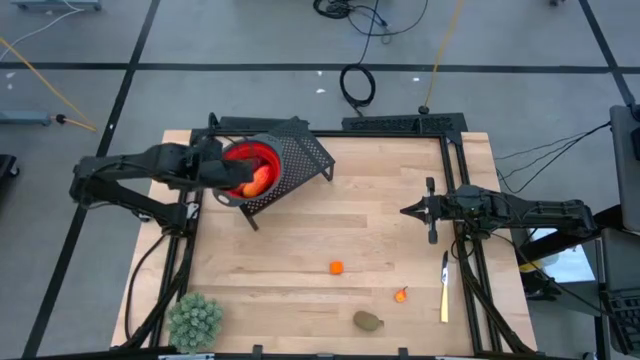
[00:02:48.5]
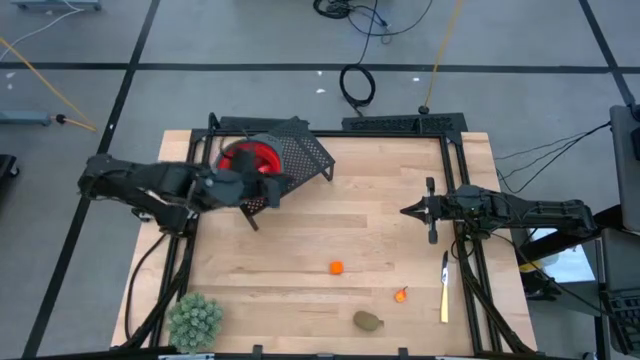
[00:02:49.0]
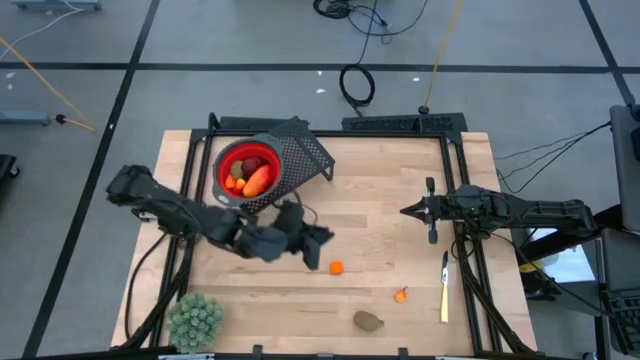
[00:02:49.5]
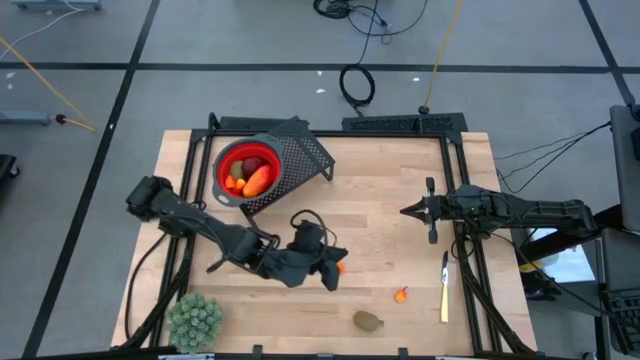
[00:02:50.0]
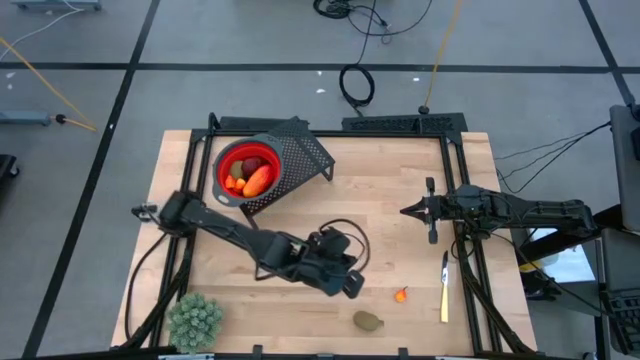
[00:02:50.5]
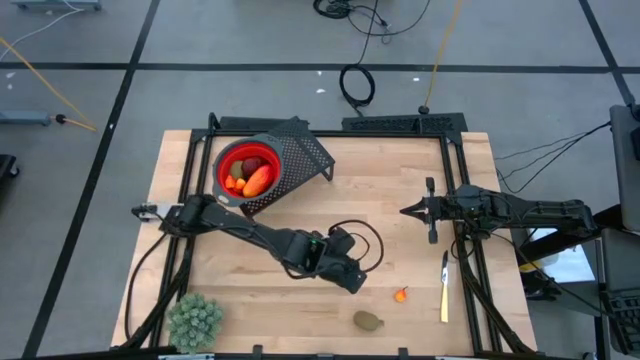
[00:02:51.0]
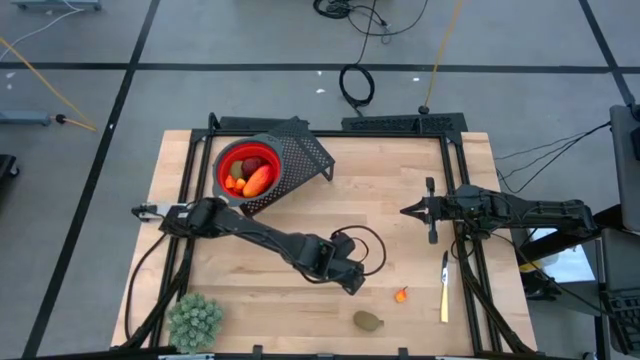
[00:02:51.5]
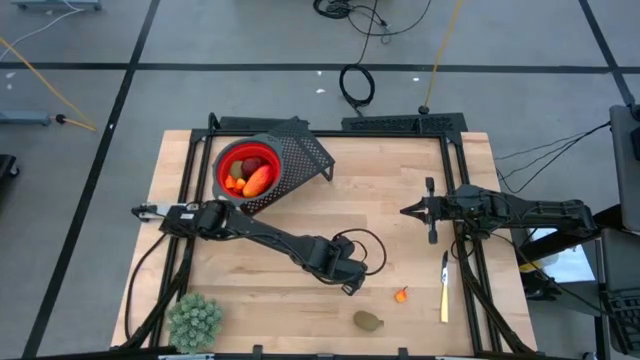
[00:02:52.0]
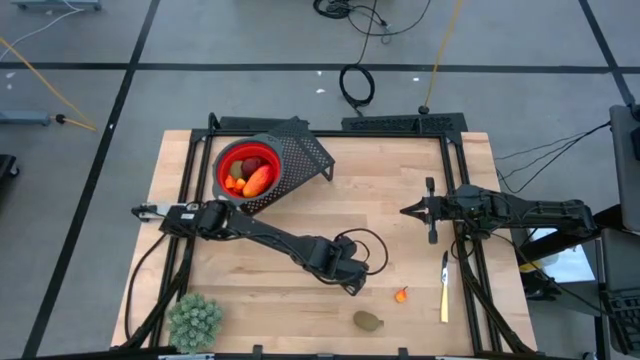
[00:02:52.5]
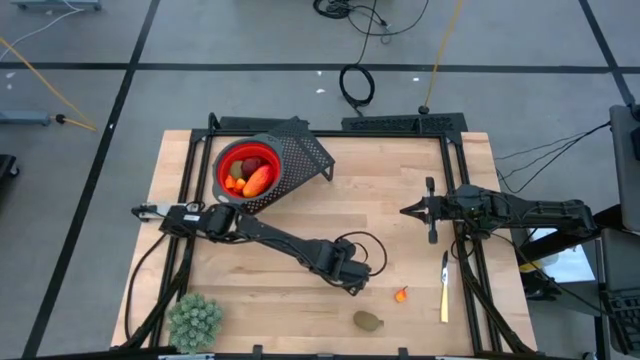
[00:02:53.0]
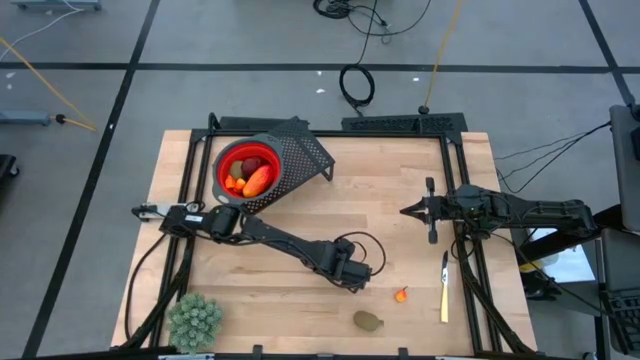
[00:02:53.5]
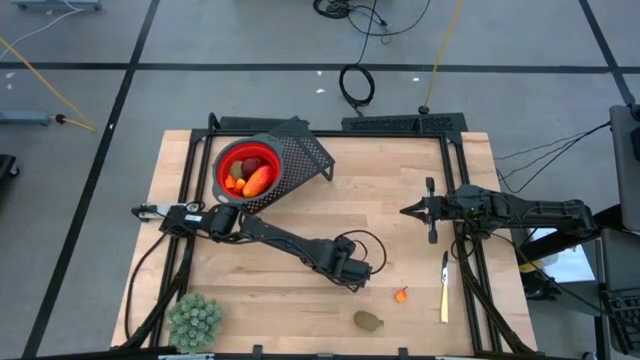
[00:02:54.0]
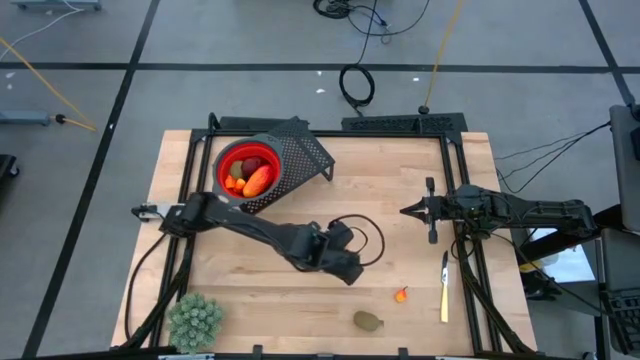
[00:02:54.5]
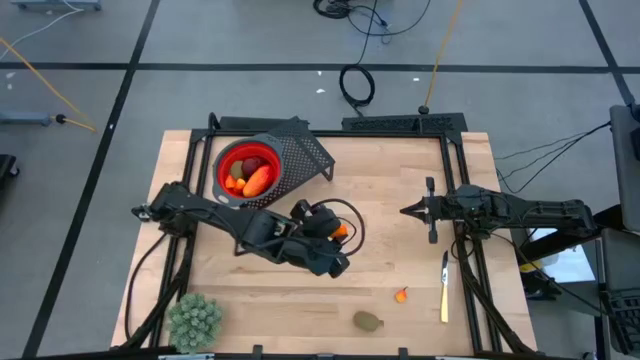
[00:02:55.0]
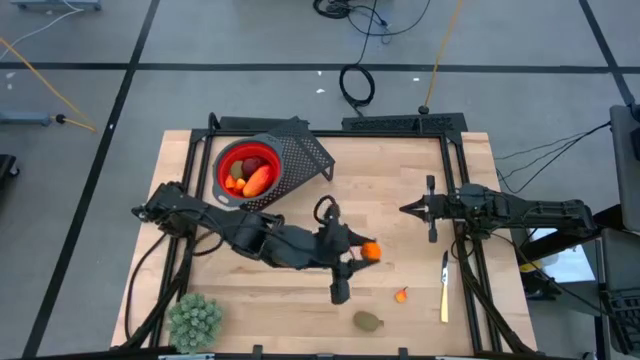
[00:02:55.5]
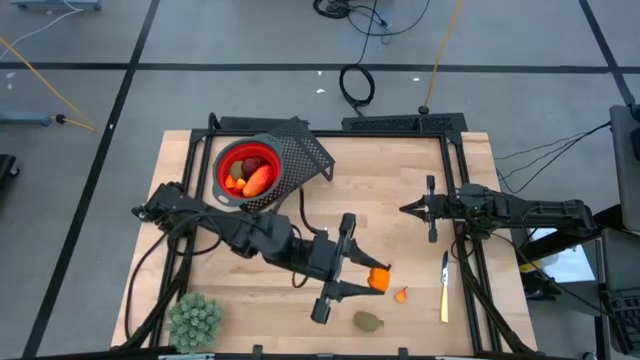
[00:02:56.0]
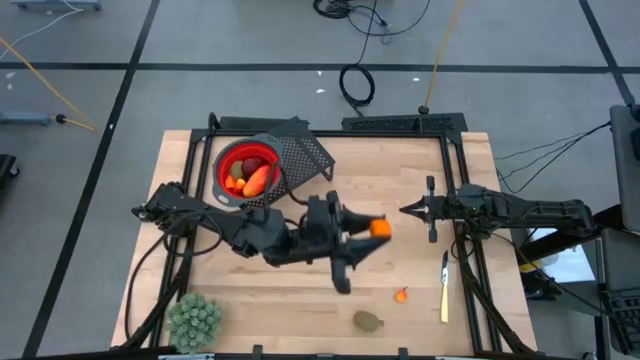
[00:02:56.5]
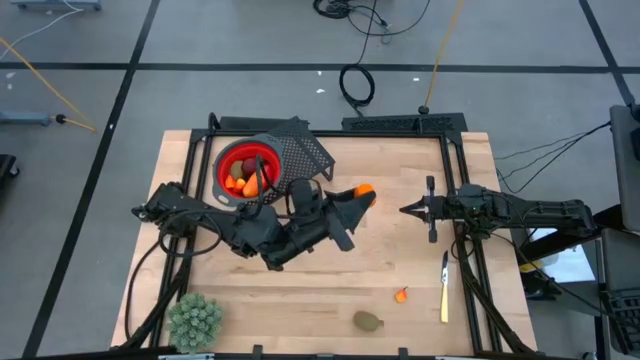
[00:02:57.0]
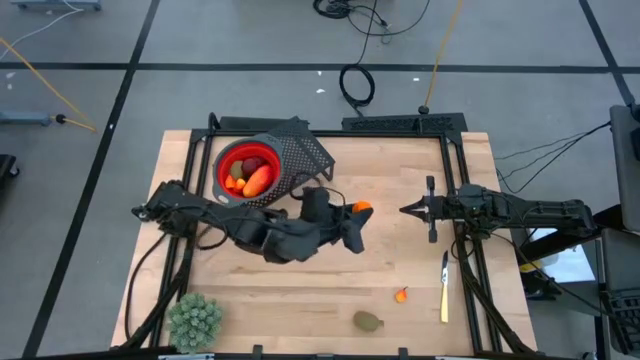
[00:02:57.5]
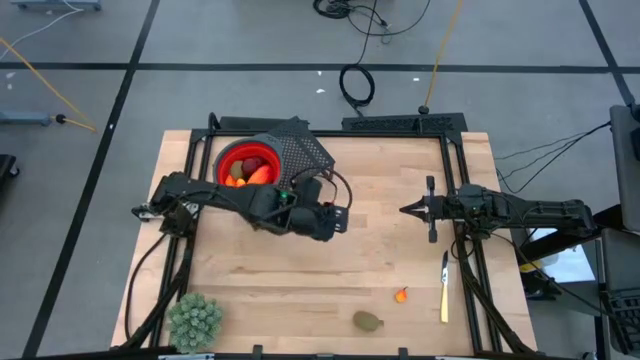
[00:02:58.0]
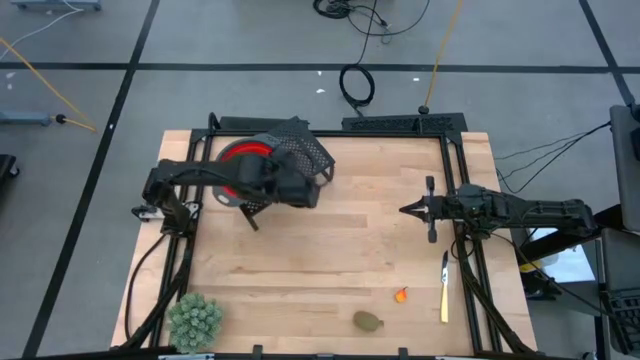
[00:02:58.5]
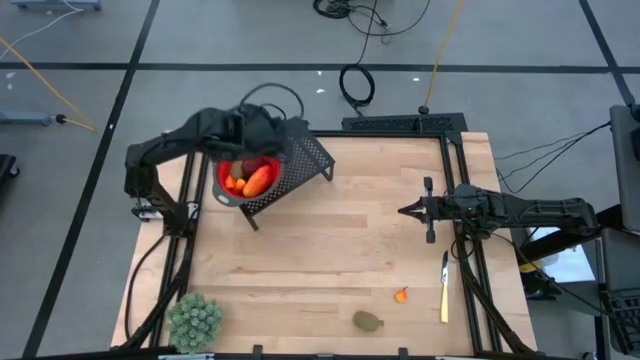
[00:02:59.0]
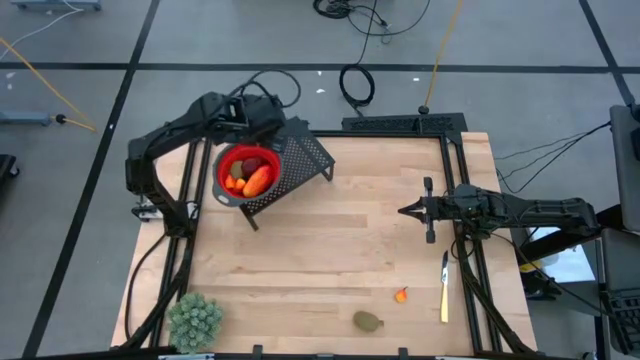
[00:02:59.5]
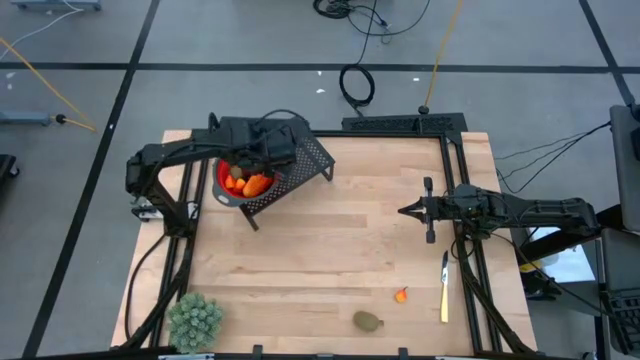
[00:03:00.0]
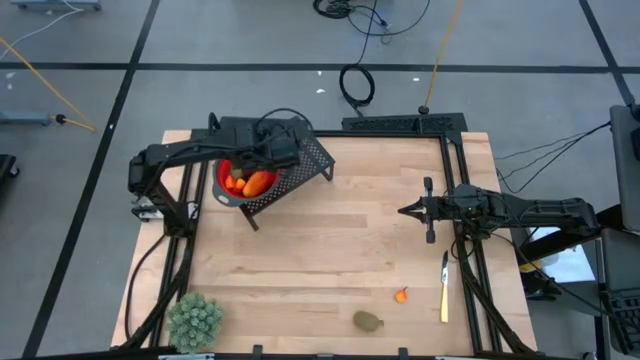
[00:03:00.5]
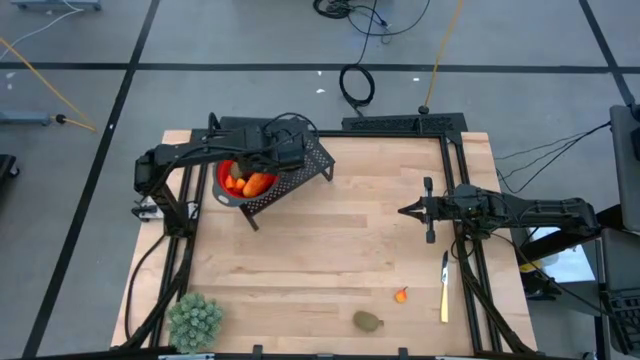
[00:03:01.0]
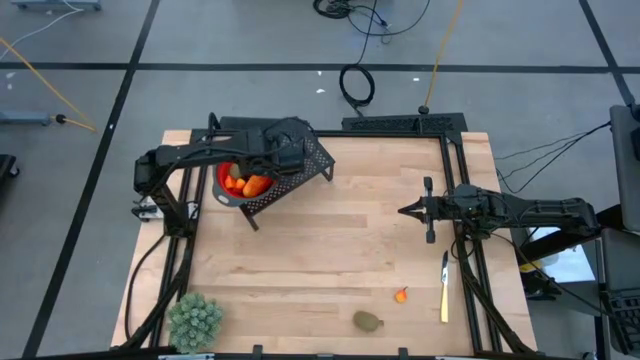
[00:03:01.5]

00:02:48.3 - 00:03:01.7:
Task: Pick & Place Fruit
Put the orange into the red strainer bowl on the shelf

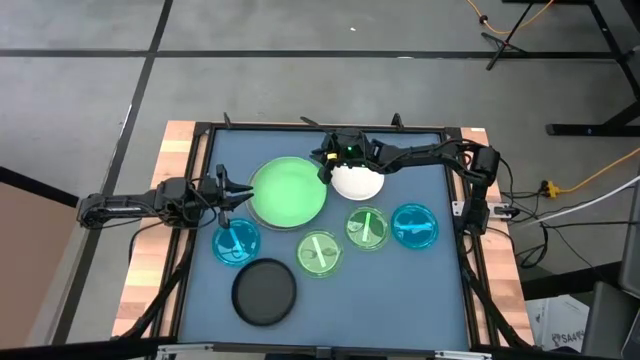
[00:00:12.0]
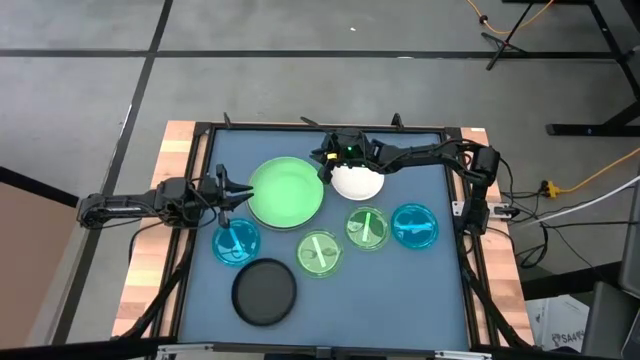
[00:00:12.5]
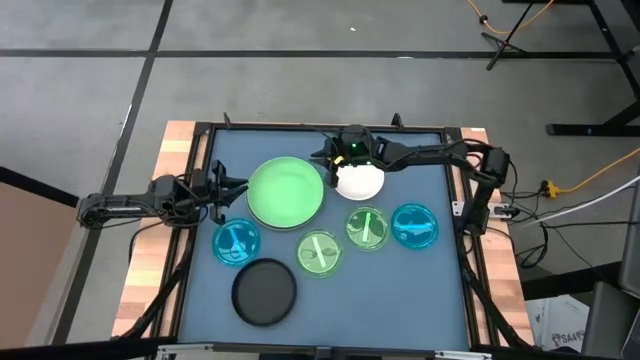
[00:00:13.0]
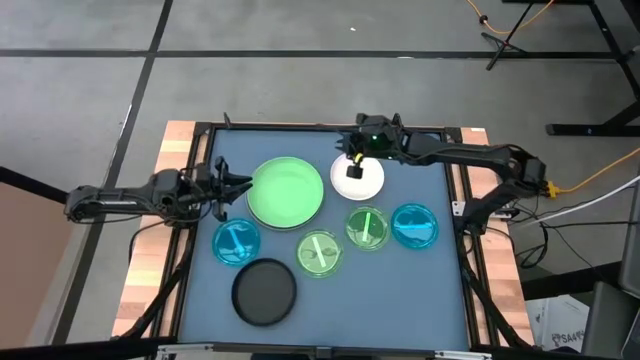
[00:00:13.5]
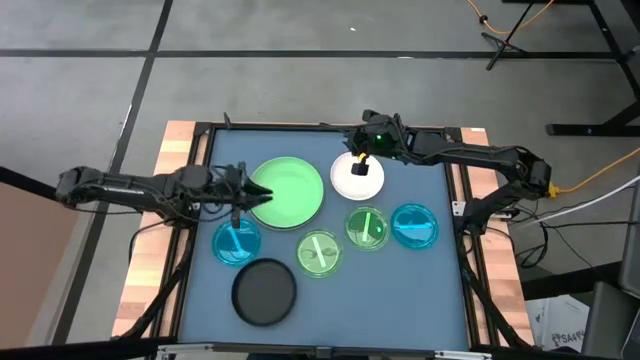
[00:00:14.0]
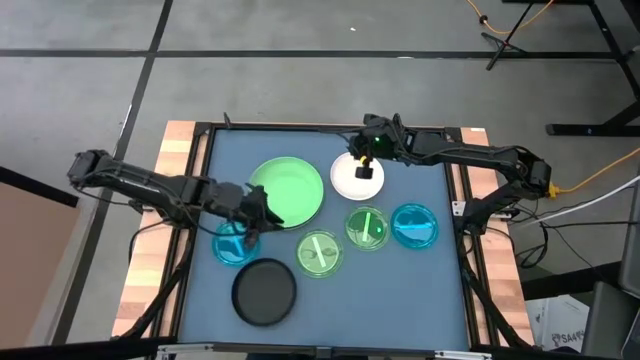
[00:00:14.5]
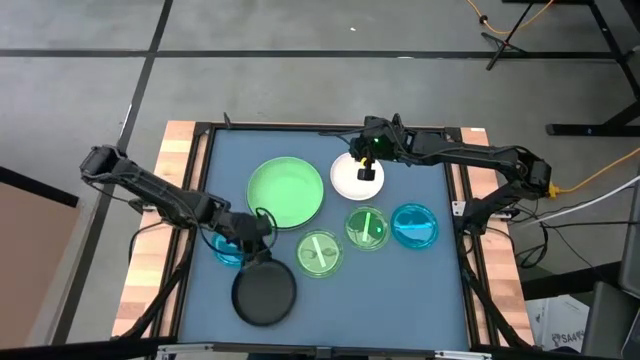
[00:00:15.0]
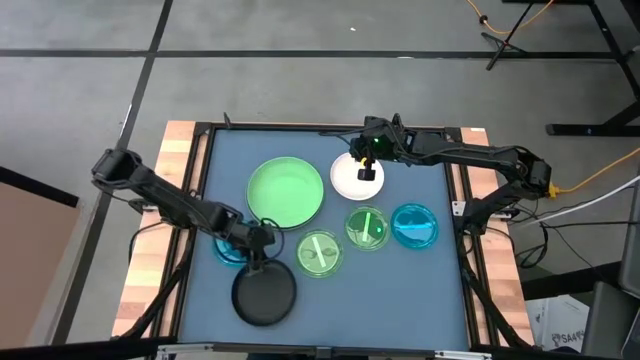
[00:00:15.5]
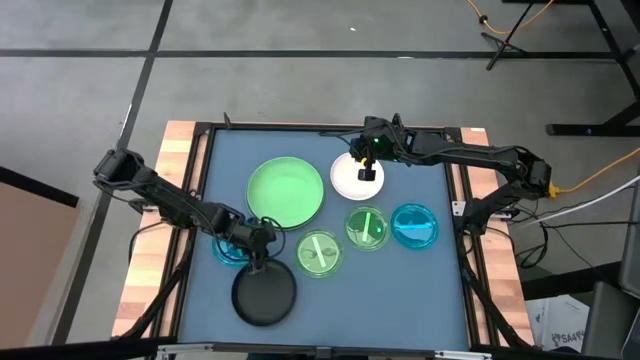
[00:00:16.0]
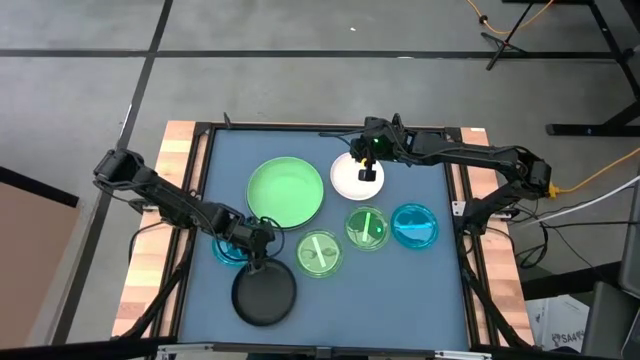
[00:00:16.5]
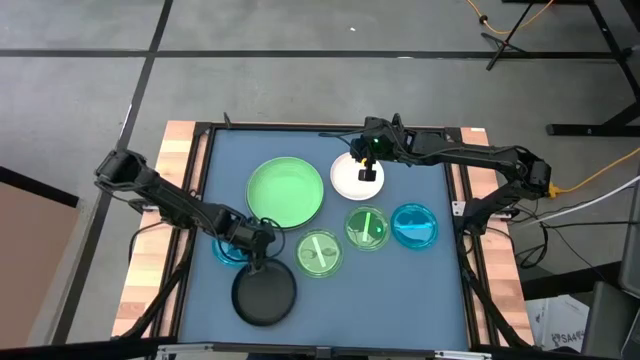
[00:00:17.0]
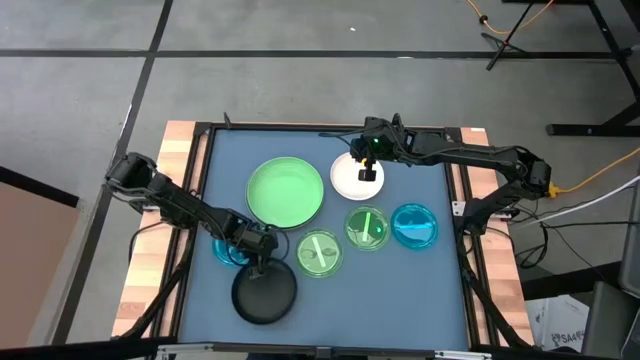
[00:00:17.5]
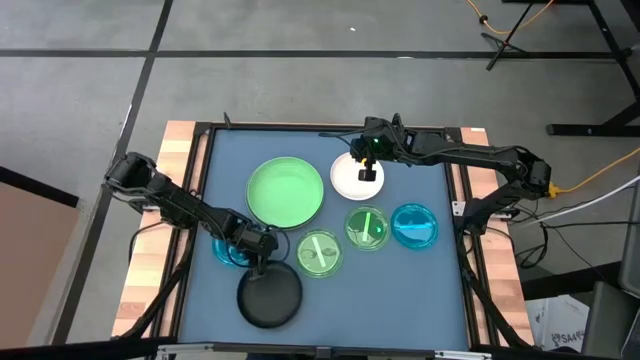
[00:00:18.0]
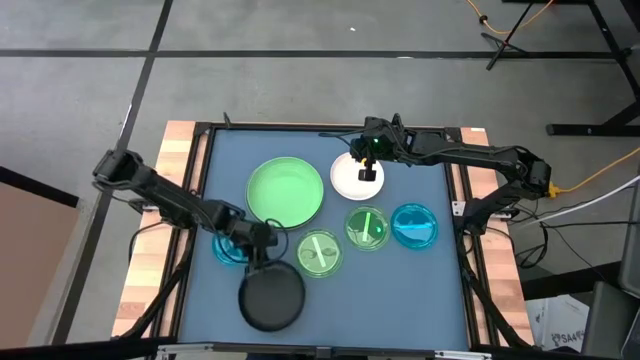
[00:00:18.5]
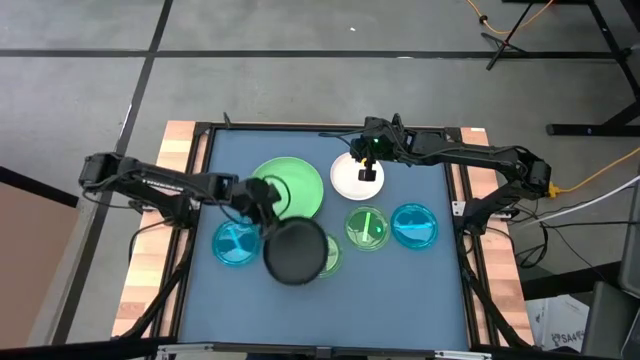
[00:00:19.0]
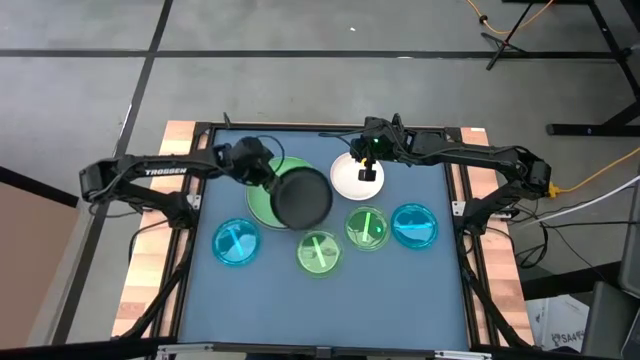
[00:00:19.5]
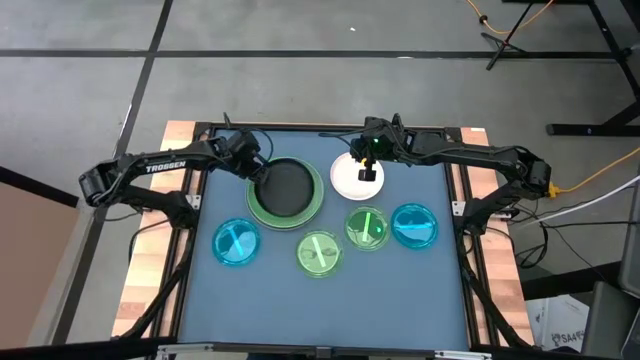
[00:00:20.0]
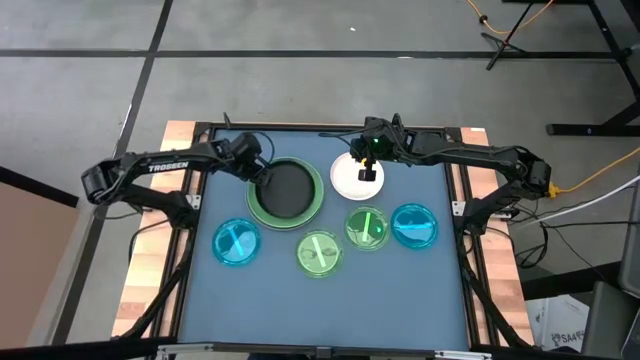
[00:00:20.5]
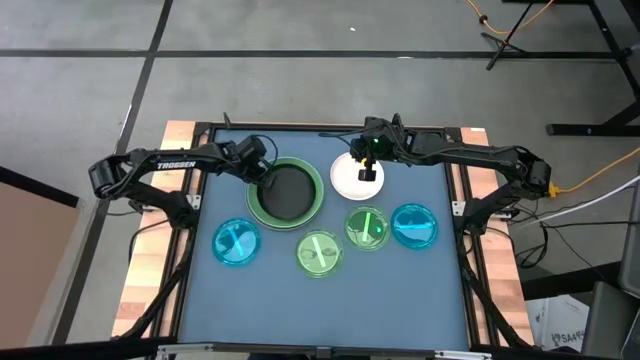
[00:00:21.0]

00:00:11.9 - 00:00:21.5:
Task: Stack plastic plates
Stack the black plate on top of the green plate
